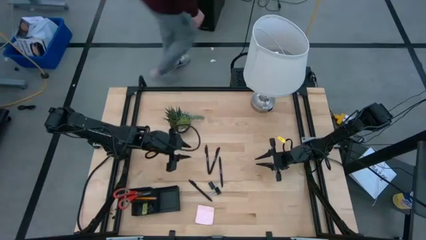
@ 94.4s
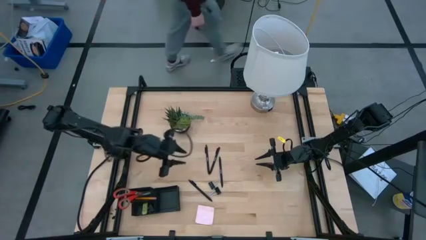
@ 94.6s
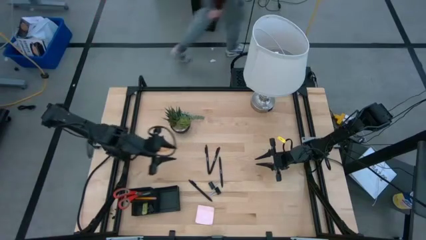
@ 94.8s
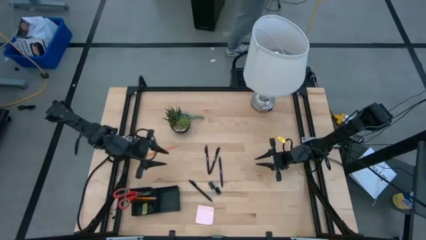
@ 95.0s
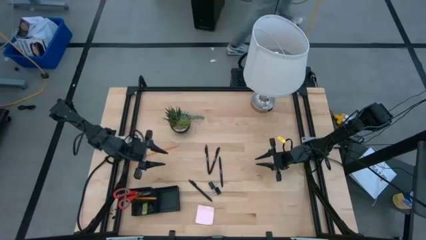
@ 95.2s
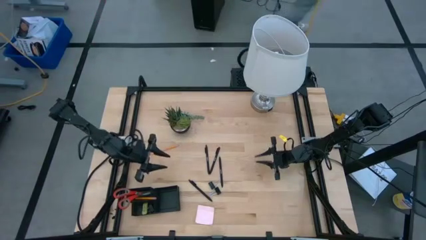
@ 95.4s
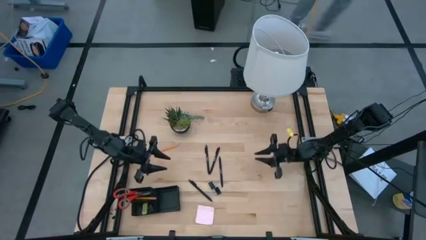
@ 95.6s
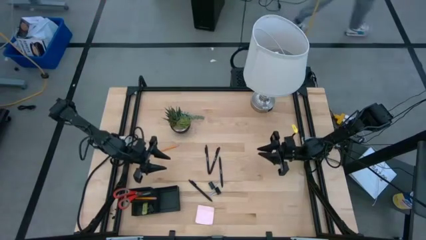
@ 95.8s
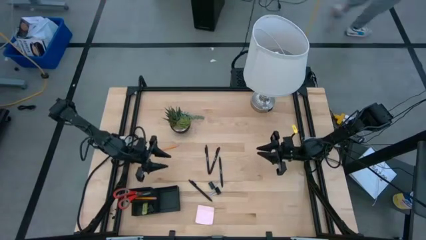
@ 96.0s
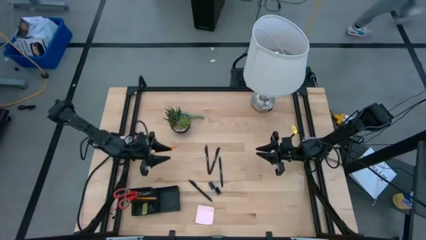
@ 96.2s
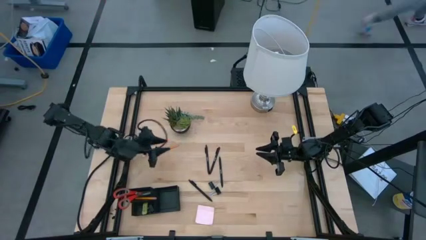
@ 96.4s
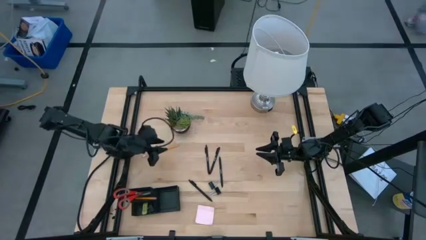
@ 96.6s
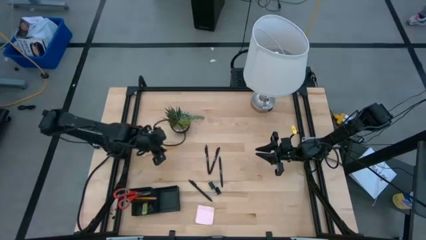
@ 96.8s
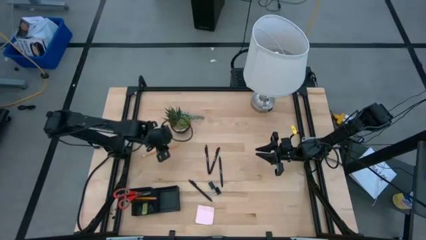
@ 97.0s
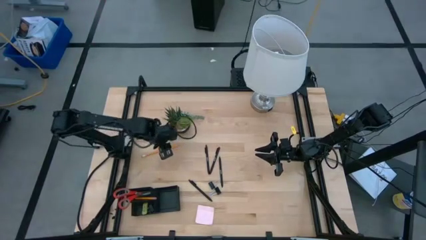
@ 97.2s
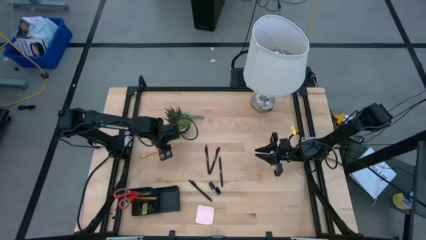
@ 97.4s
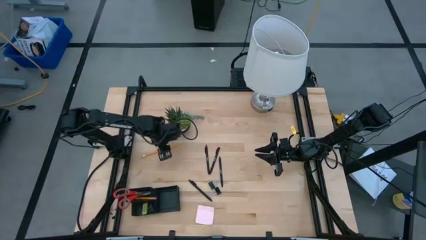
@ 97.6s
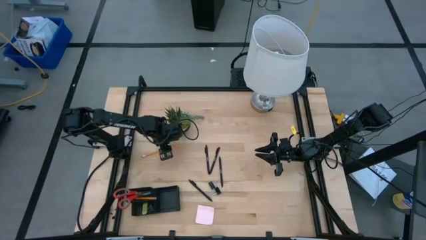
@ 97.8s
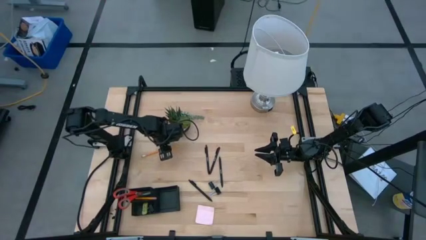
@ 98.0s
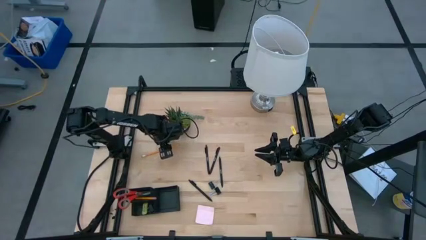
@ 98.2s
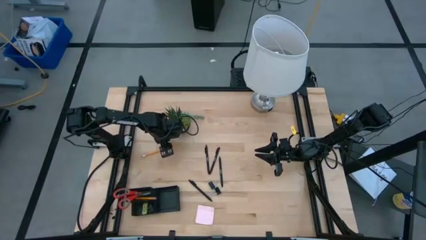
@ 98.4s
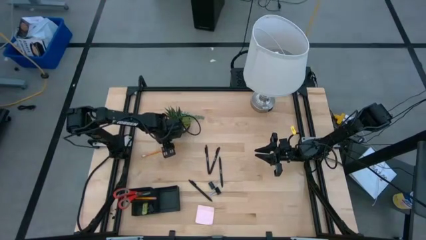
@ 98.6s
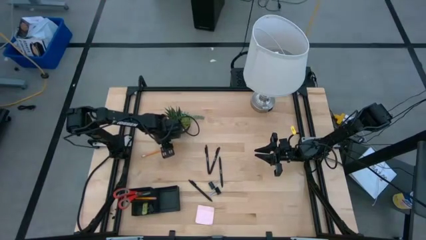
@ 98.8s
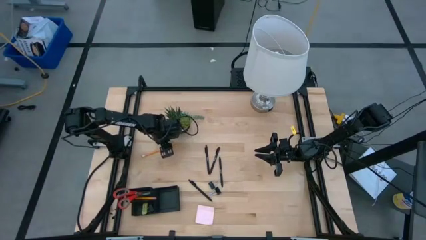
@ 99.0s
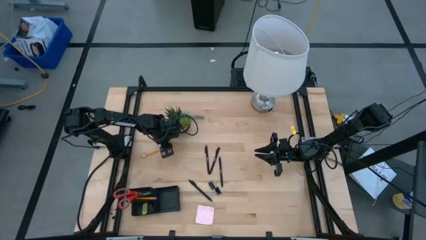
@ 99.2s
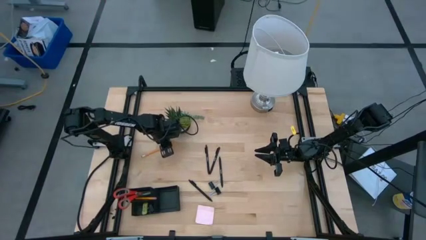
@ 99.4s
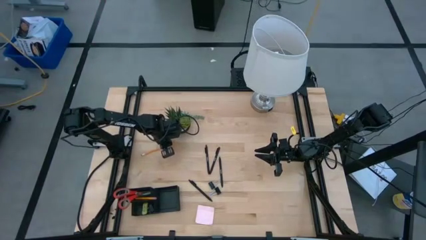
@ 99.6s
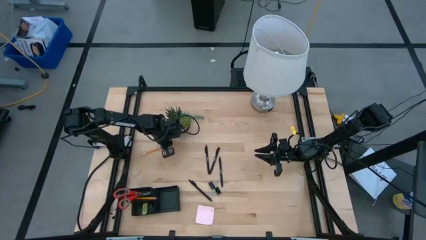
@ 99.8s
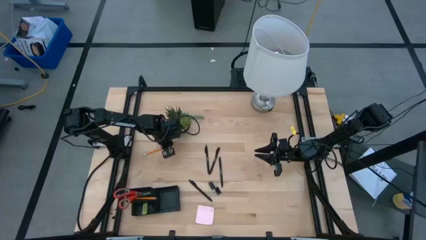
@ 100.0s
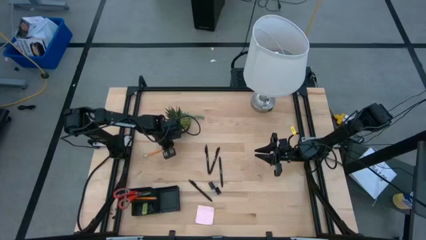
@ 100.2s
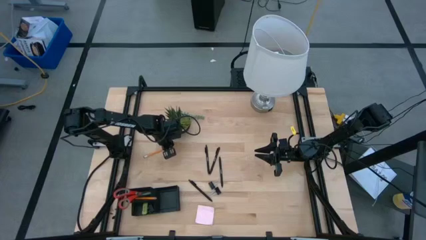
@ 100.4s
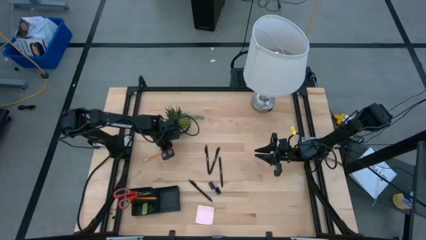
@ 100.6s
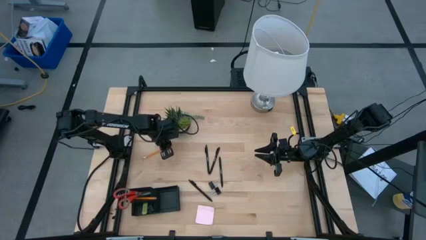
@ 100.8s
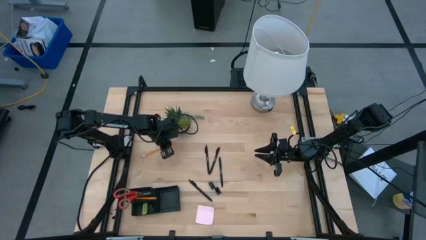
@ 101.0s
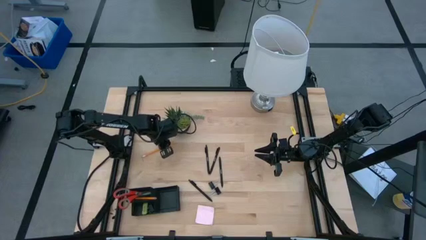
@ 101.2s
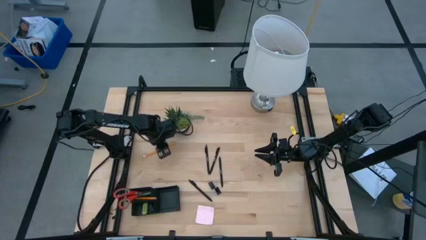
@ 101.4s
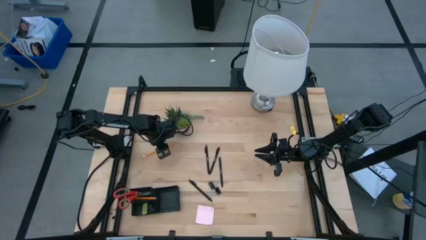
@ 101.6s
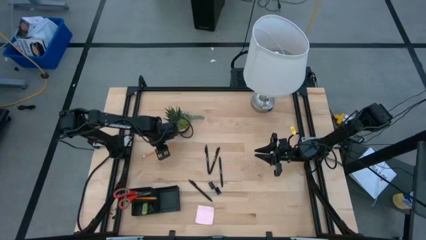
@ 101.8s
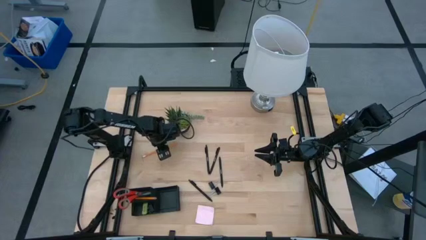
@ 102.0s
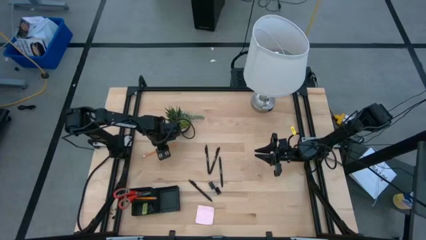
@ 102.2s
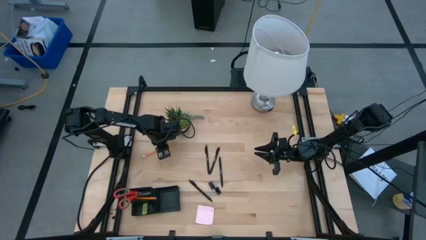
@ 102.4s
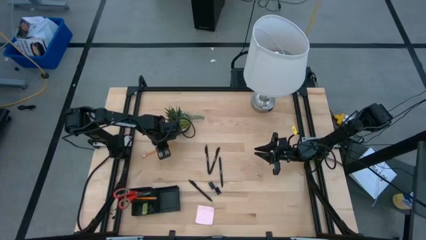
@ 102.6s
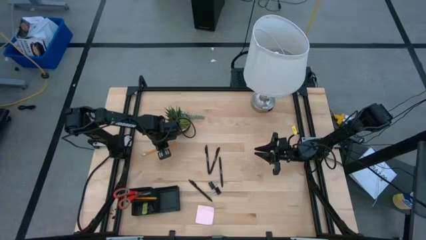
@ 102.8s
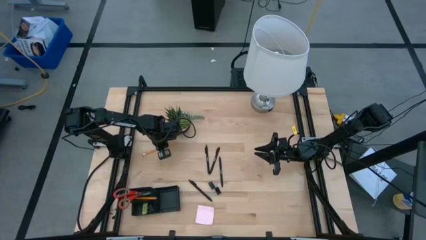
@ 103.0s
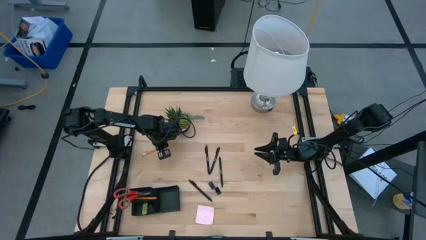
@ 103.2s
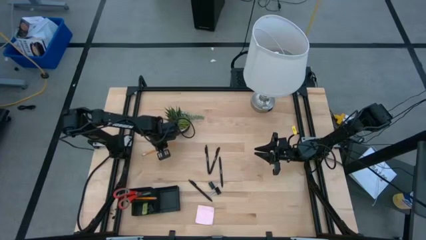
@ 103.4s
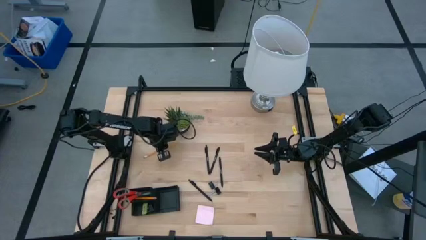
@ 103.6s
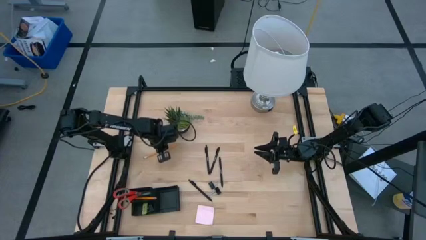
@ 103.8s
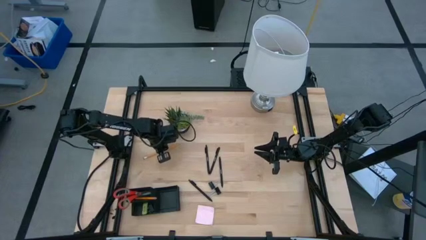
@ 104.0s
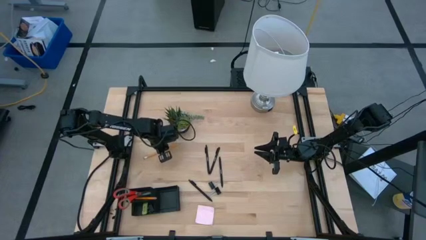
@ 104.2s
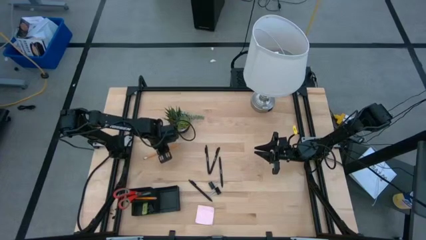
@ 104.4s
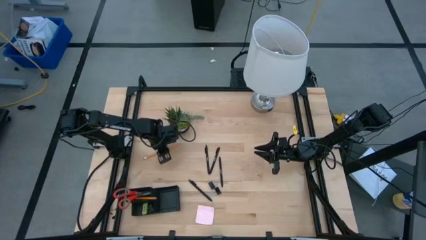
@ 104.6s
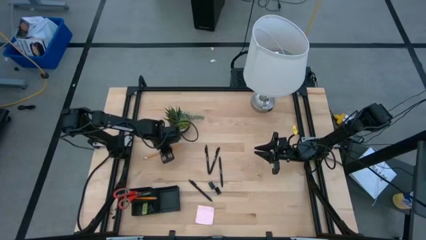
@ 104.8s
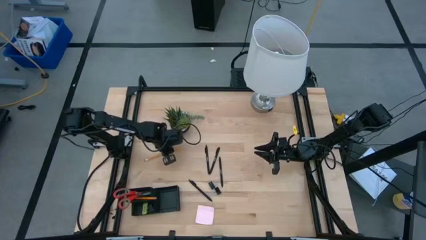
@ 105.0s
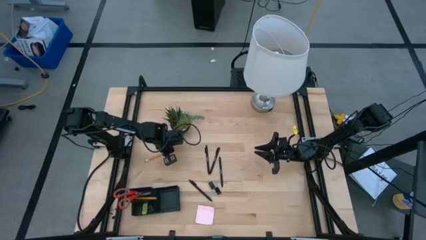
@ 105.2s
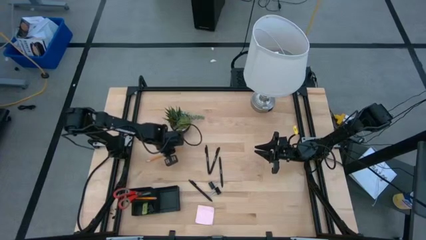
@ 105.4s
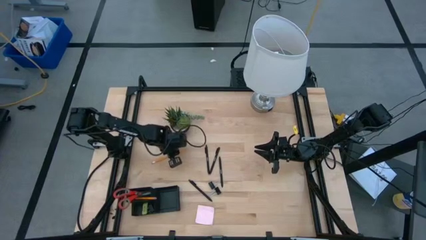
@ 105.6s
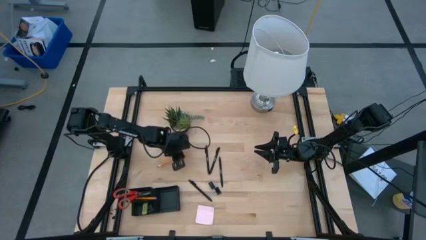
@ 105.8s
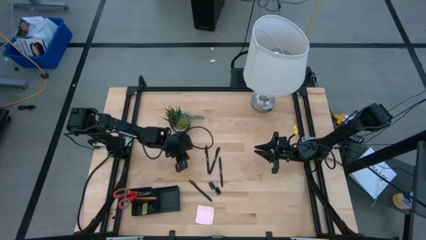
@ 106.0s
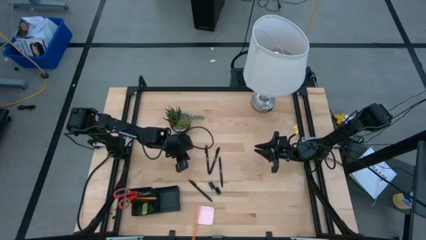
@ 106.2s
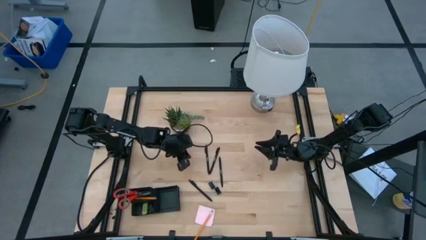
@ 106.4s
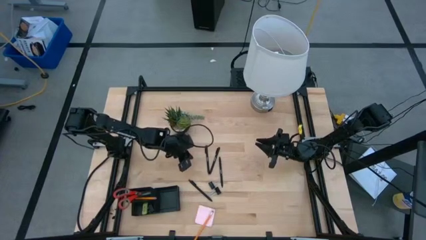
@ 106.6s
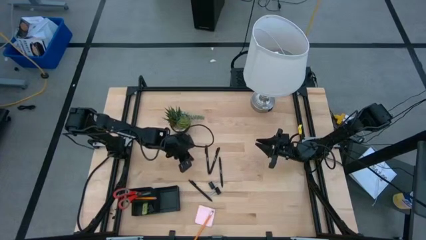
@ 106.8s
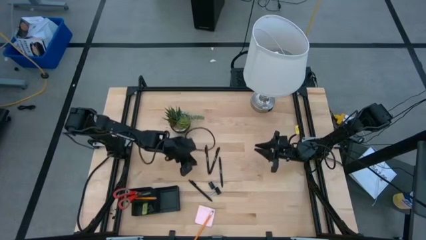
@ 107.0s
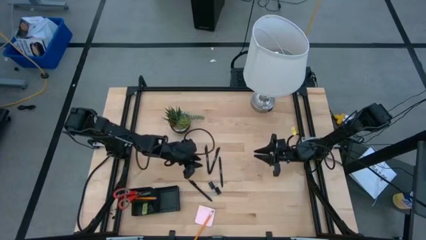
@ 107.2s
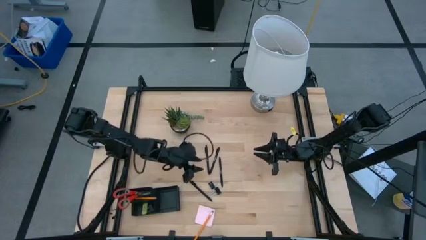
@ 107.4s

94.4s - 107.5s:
Task: Pick and place office supplies into organizer
Put the pencil into the top left section of the desk organizer

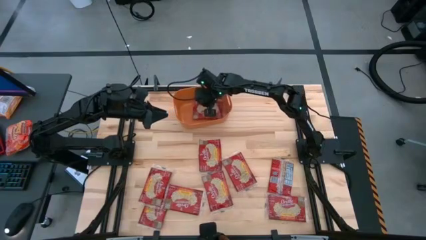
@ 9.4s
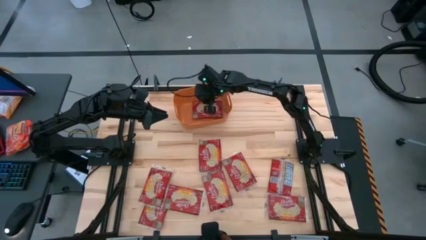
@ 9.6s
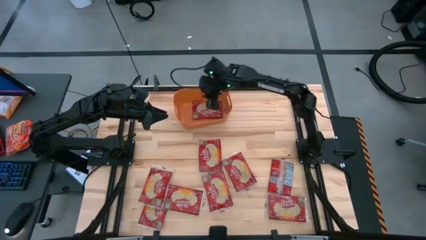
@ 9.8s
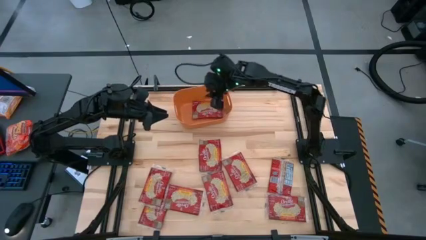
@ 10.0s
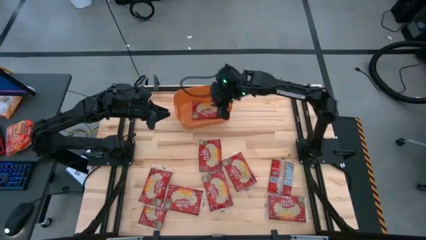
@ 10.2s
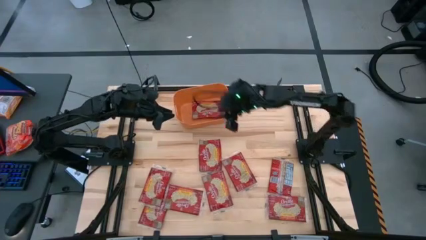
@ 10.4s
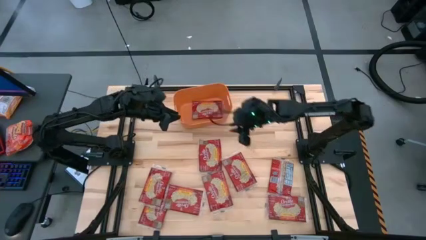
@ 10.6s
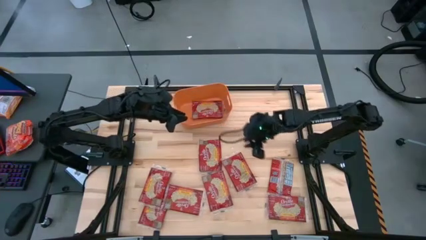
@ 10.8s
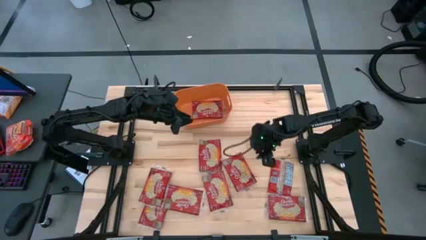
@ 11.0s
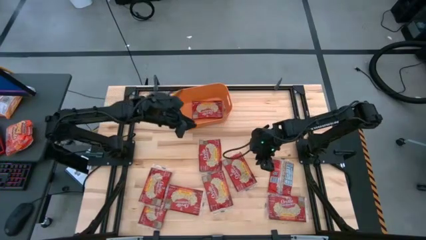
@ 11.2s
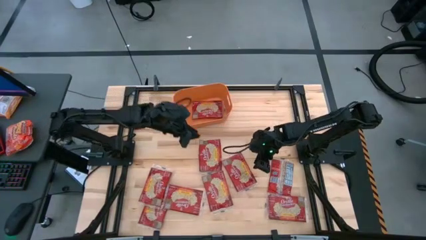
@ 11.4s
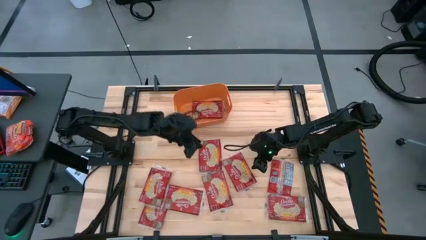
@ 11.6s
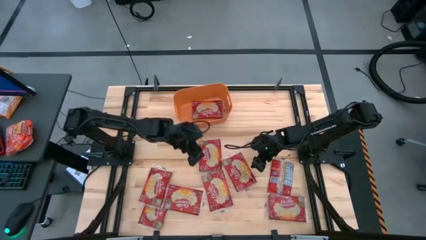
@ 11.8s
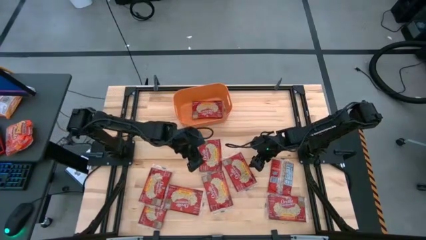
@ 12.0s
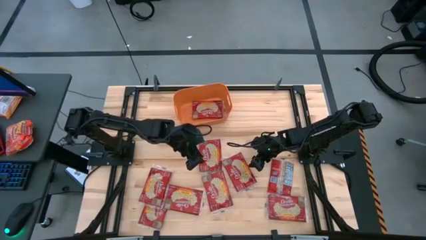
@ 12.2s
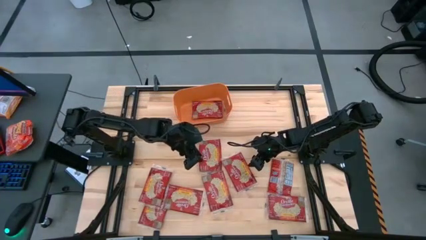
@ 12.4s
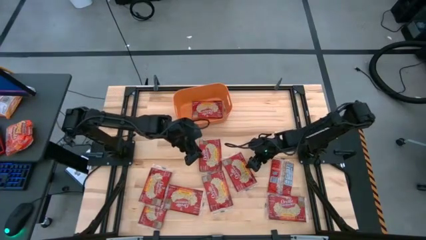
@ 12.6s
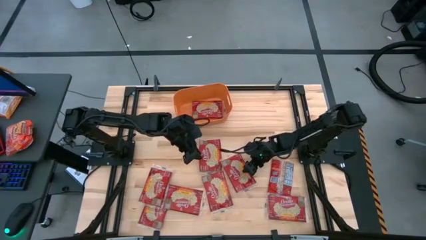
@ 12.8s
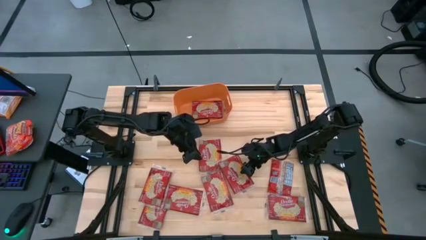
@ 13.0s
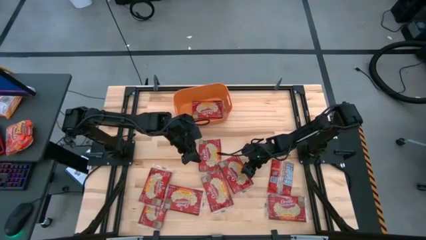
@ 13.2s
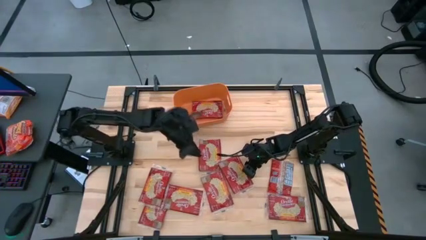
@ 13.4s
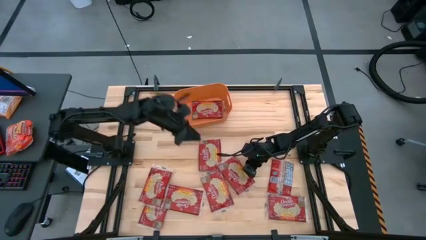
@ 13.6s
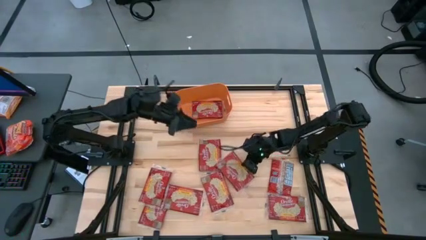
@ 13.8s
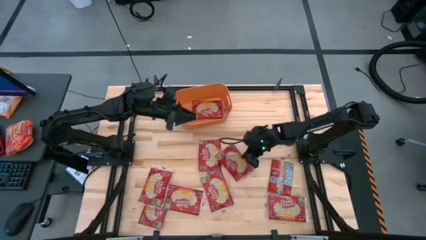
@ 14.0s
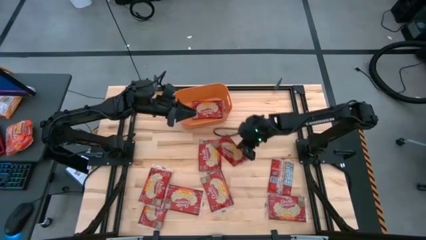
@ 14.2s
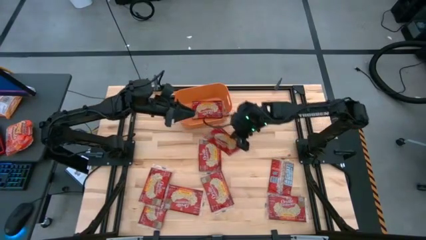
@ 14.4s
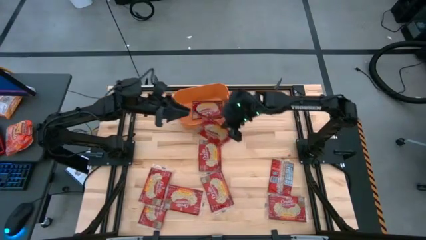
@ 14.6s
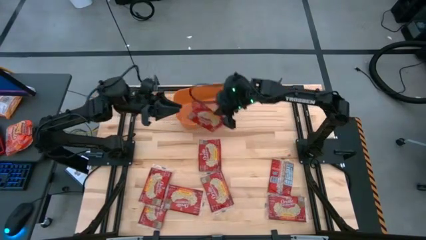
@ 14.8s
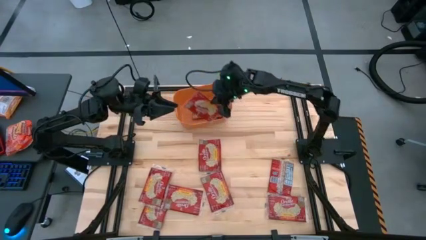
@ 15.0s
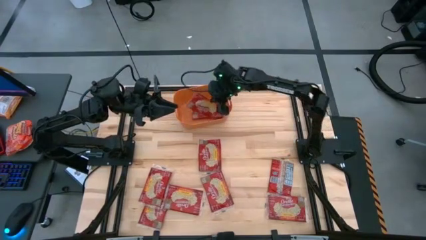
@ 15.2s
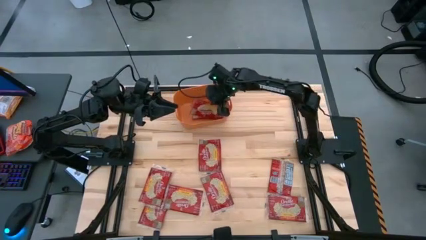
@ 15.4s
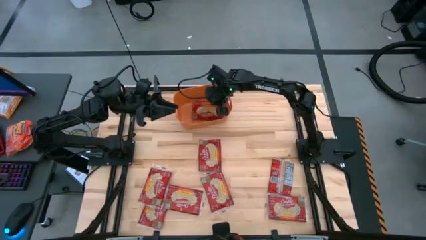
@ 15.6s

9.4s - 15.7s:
Task: Sort popcorn bags into baskets
Put the red popcorn bag into the orange bin
